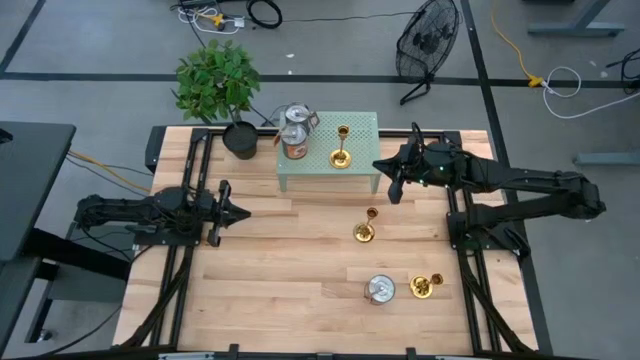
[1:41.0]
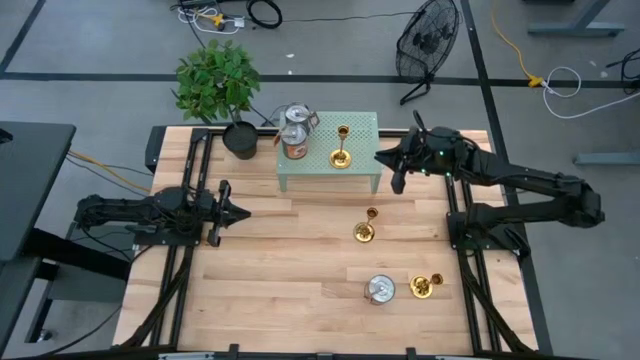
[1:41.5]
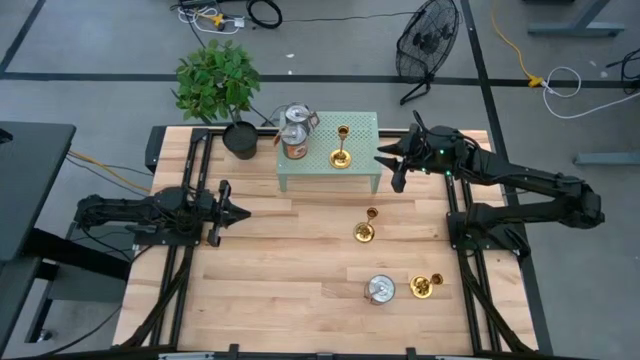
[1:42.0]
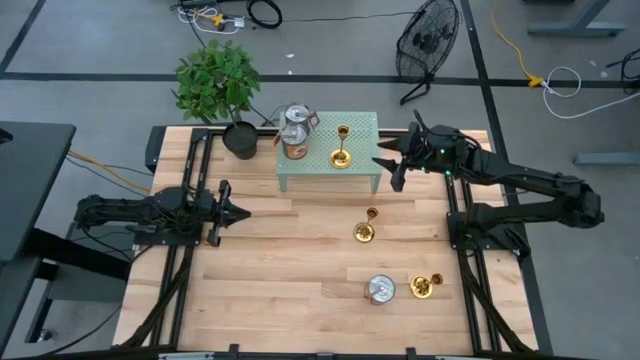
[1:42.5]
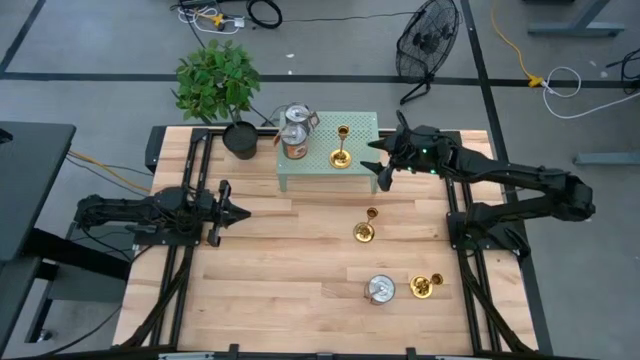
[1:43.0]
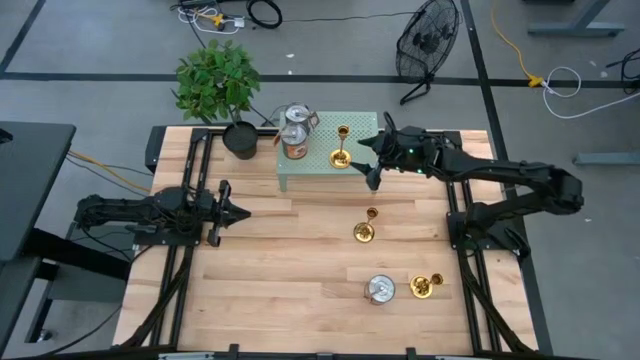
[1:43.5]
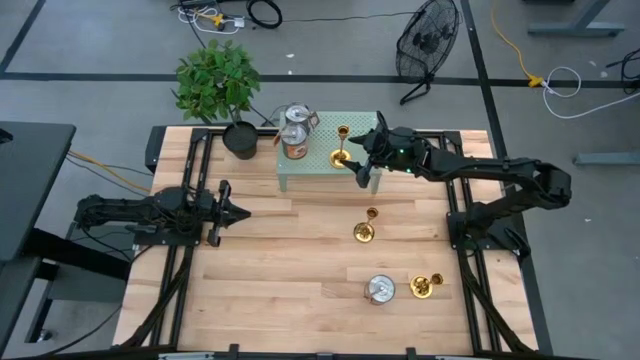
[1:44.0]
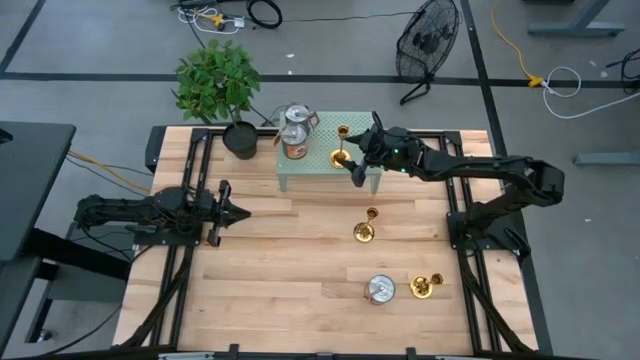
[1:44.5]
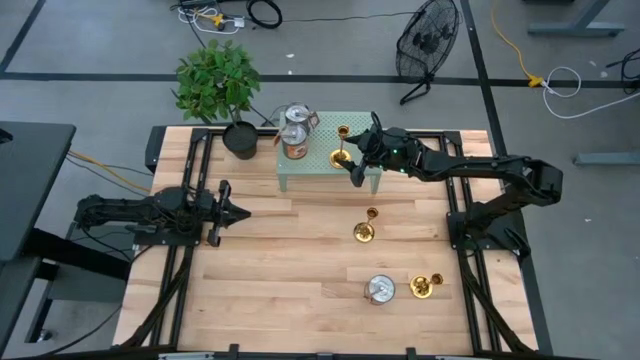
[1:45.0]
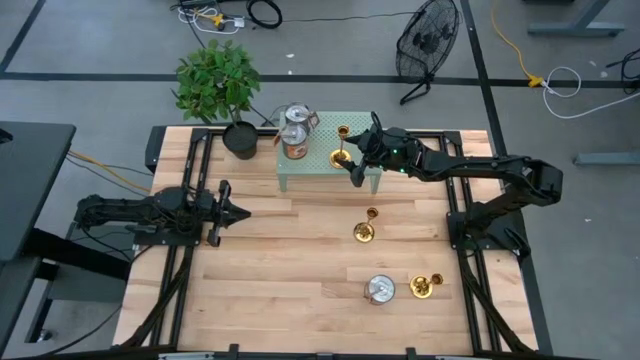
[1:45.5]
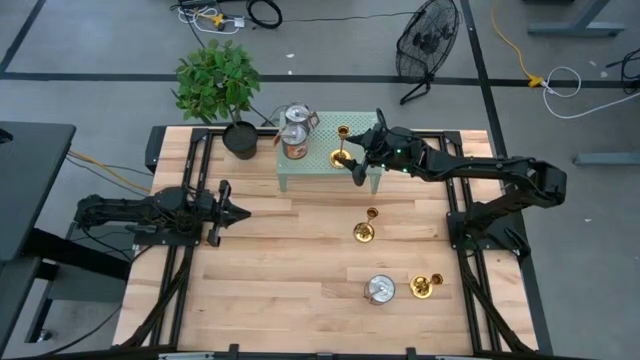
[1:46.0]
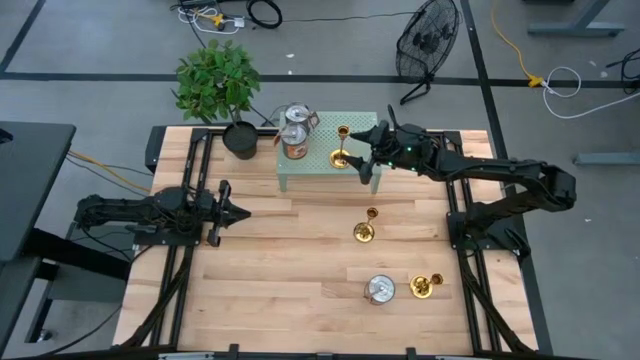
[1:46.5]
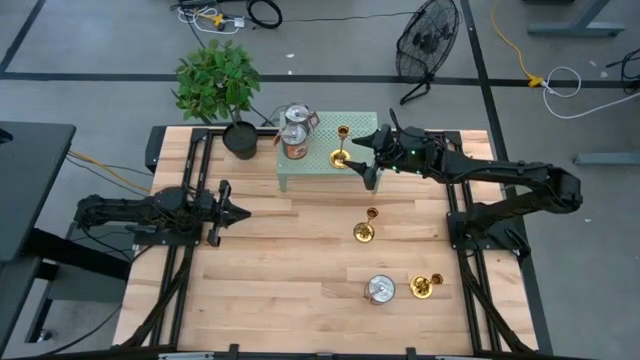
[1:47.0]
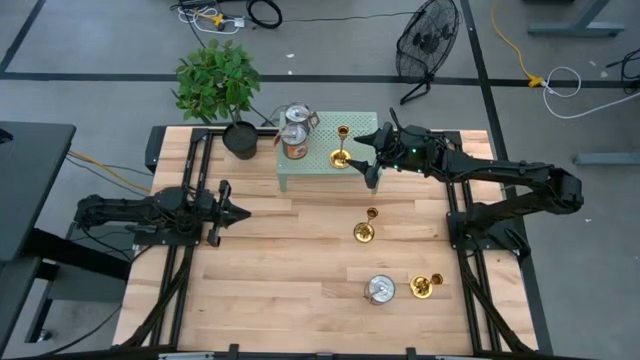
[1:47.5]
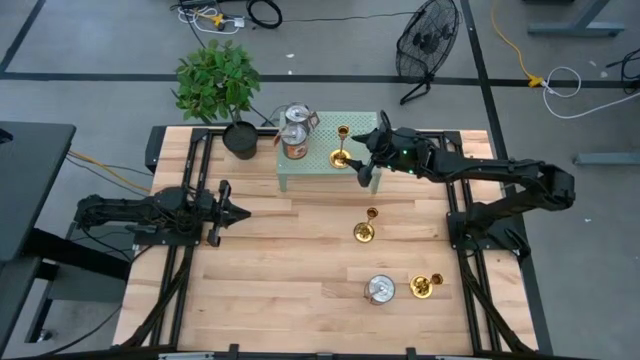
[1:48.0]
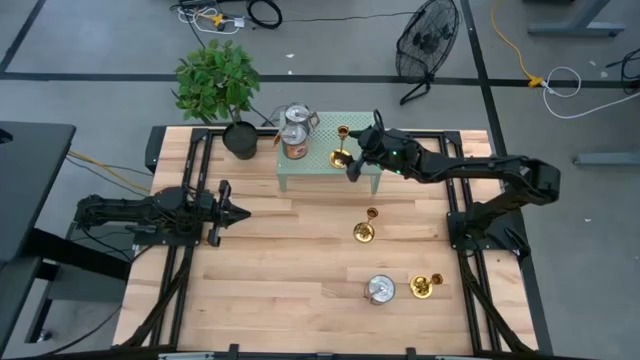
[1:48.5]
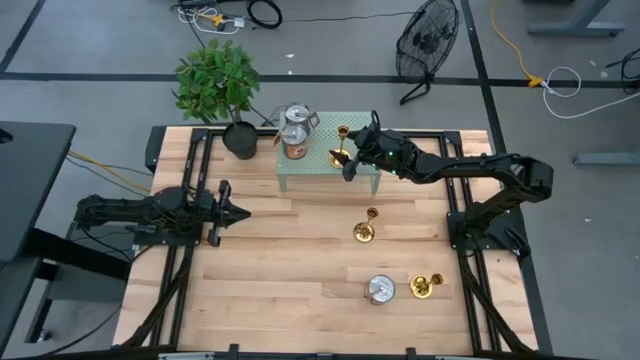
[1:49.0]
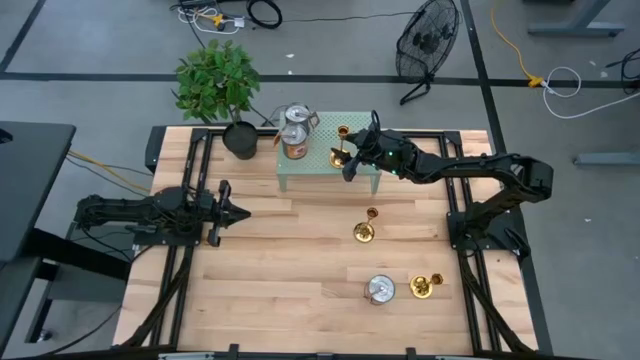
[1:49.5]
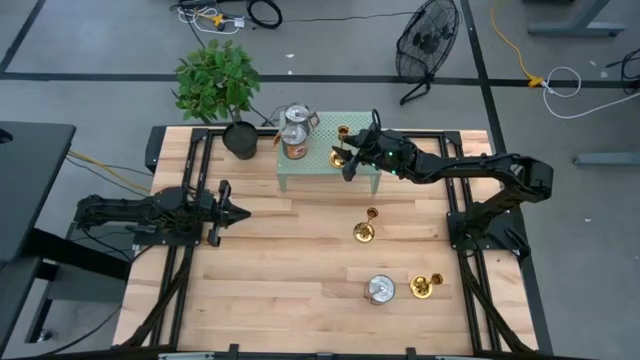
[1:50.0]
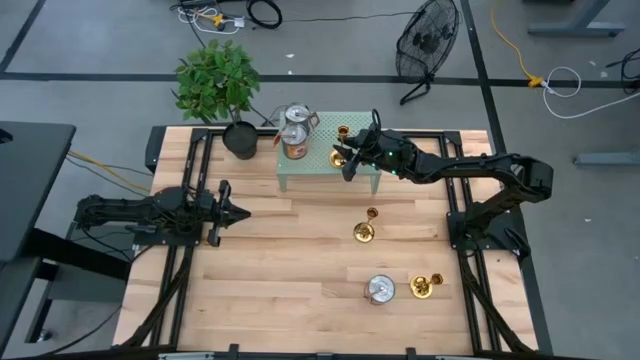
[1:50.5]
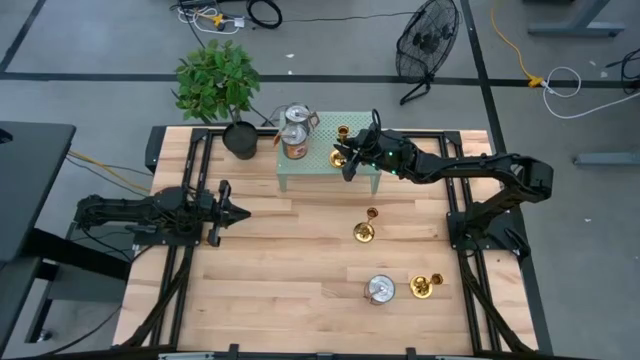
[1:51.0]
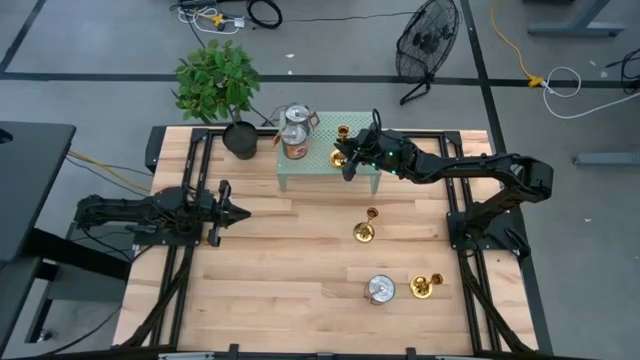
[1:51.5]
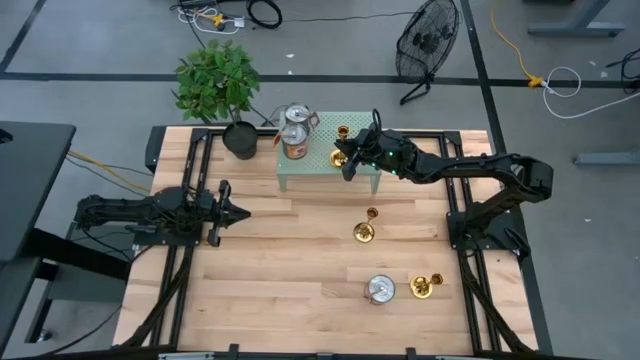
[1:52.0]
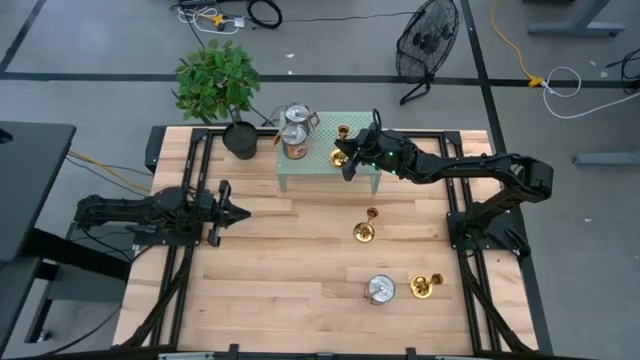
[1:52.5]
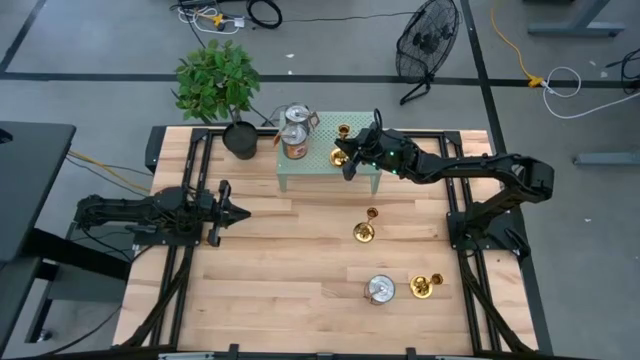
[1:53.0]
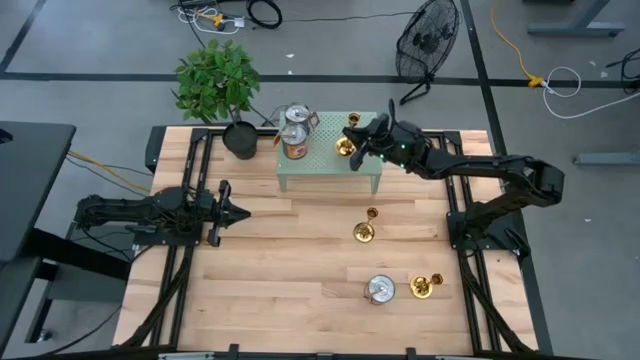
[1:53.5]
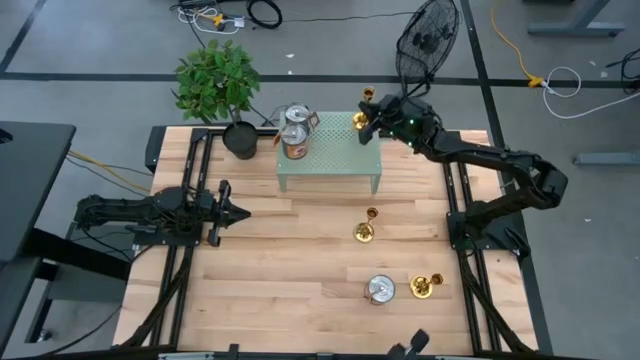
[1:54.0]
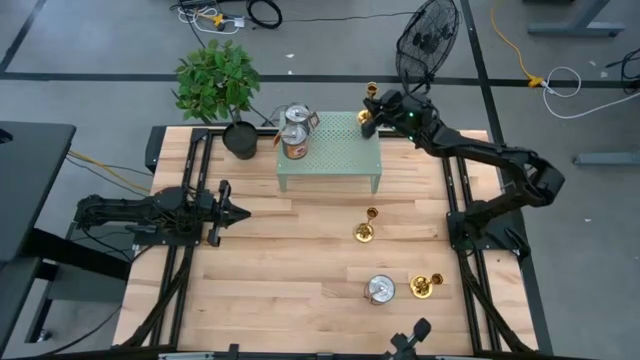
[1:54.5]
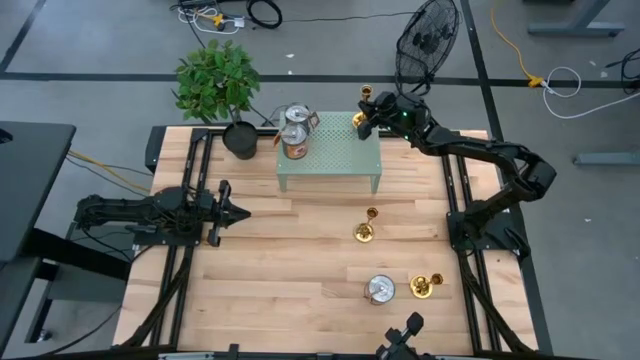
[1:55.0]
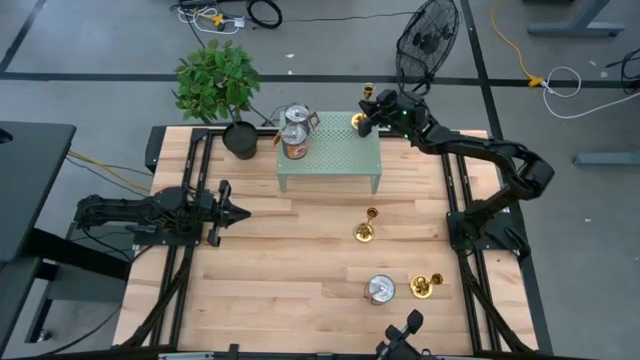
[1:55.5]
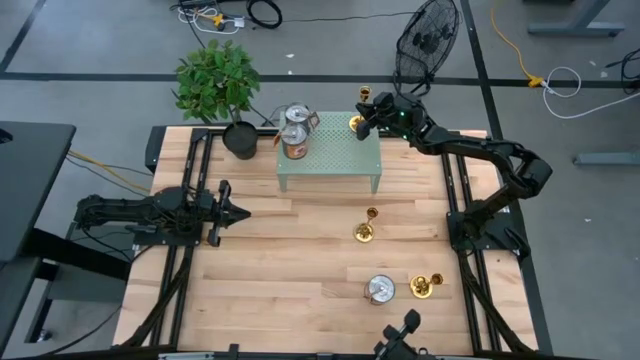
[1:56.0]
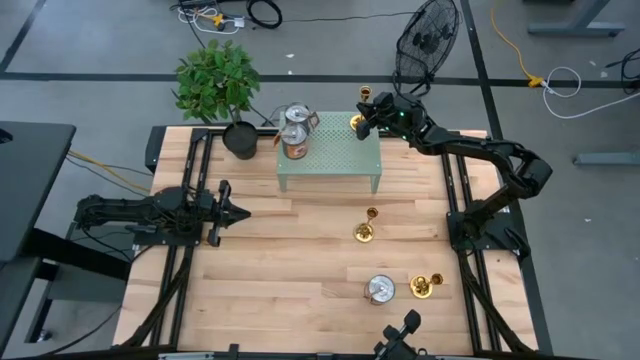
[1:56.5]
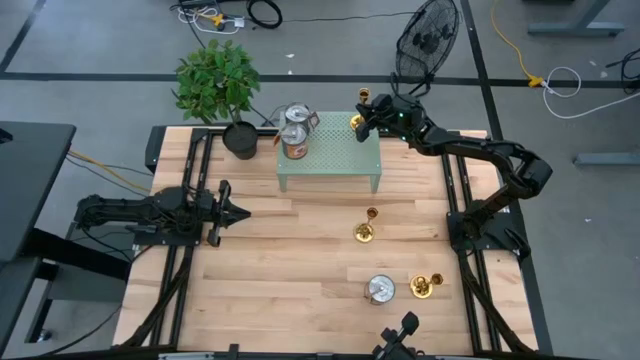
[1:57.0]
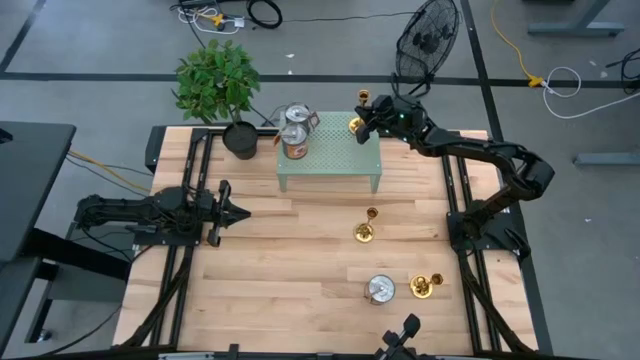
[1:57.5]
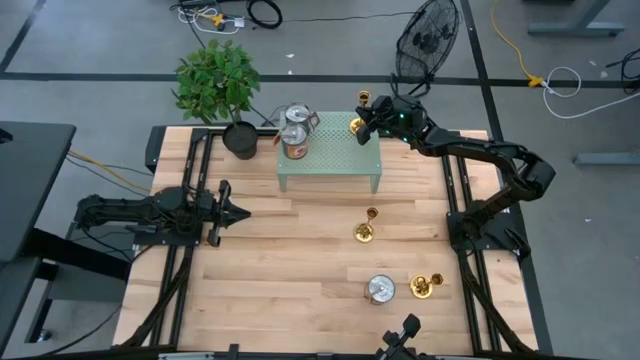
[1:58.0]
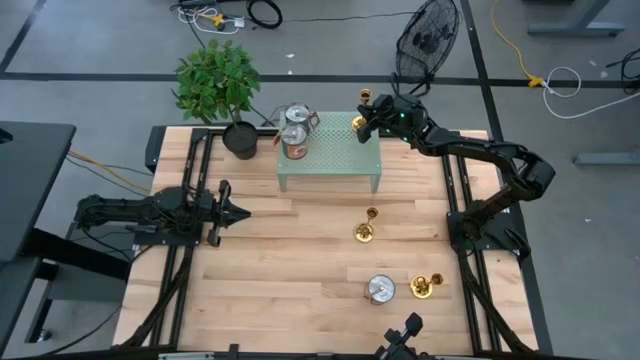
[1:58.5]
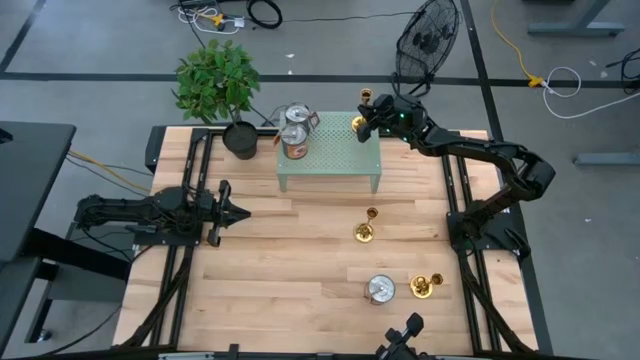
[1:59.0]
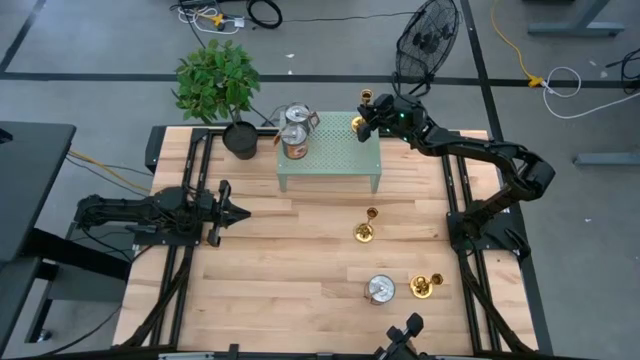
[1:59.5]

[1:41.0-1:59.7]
Task: Pick & Place candle stick holders
Put the top left gold candle holder on the shelf

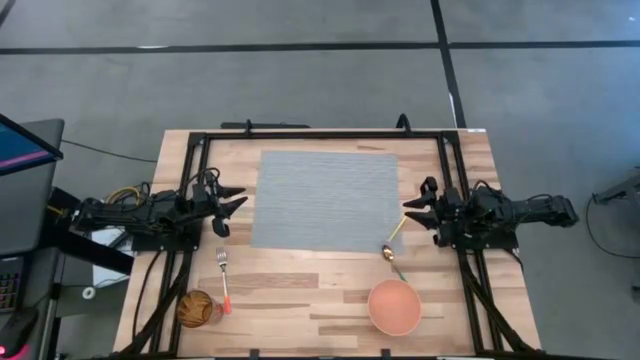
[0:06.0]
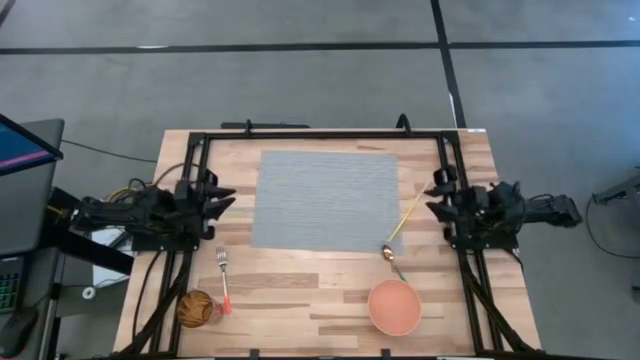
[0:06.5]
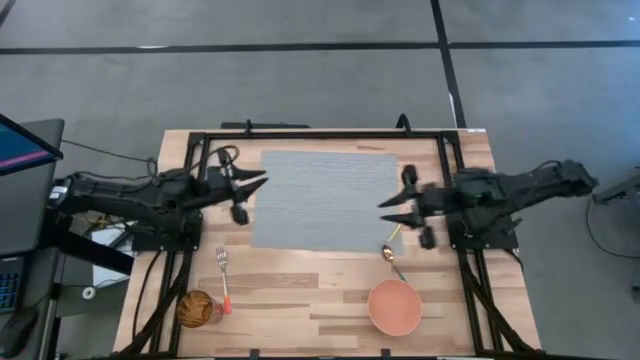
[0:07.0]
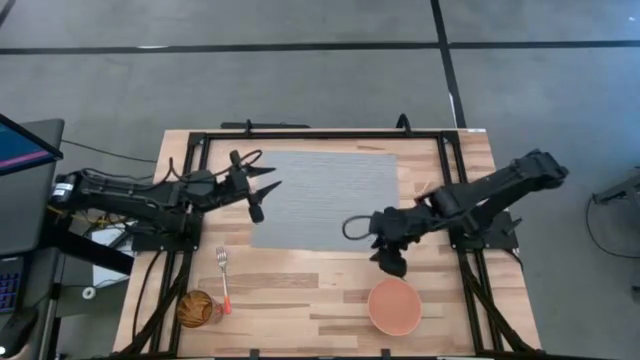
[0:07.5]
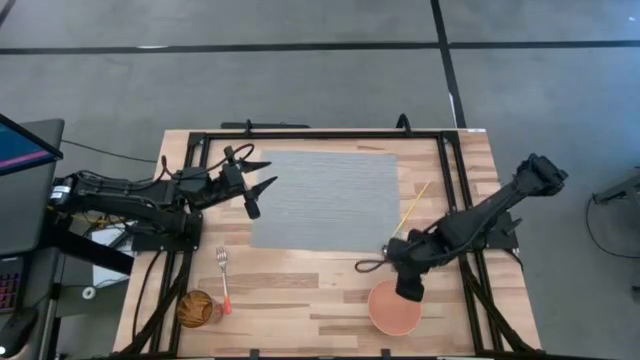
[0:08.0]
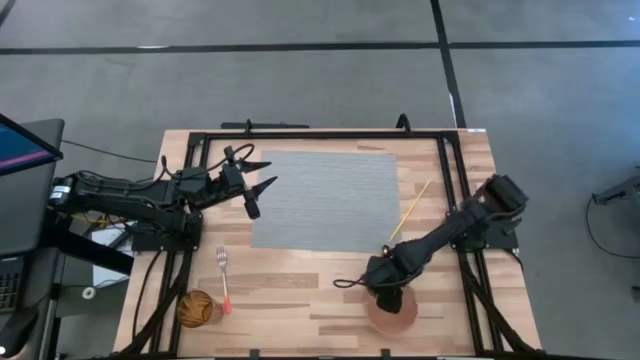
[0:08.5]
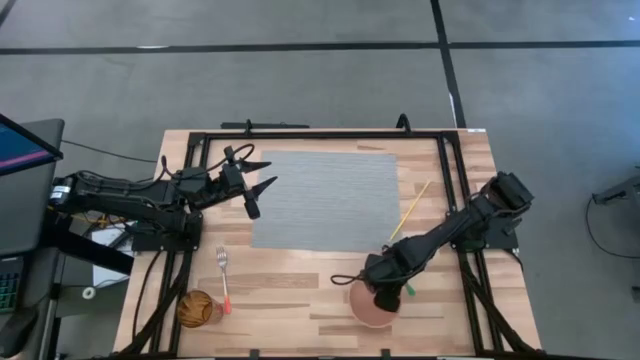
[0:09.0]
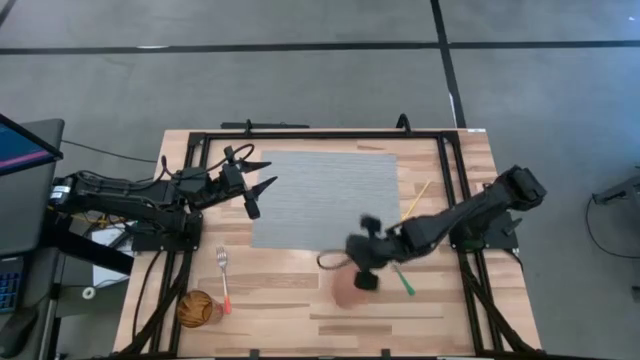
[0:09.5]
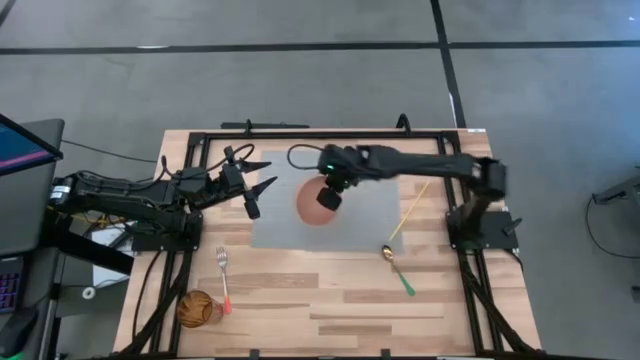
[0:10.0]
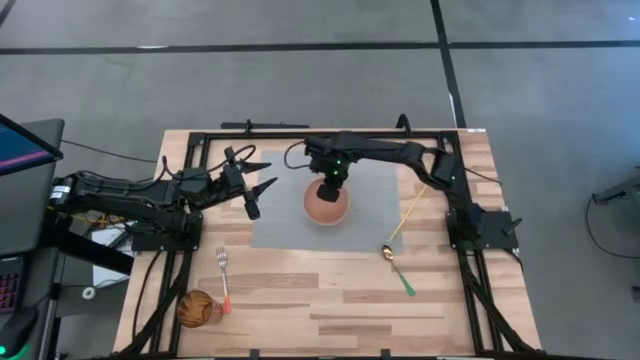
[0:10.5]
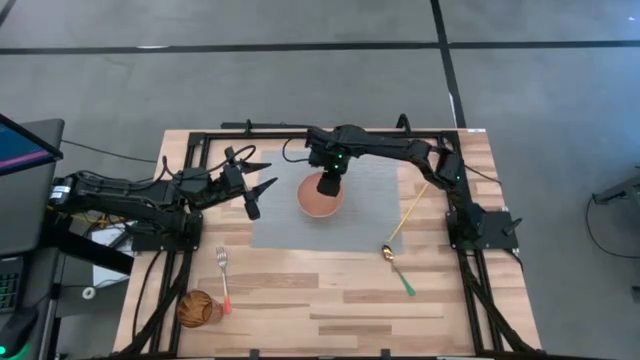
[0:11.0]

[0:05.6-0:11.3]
Task: Pick & Place Utensil
Put the orange bowl on the center of the gray mat
